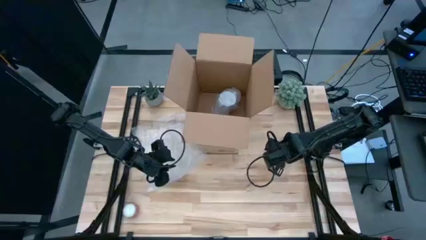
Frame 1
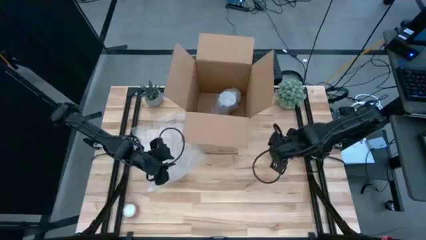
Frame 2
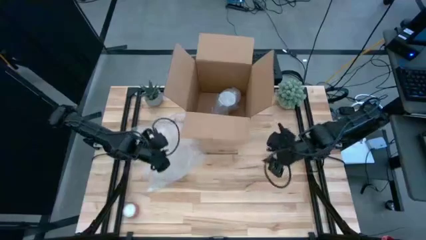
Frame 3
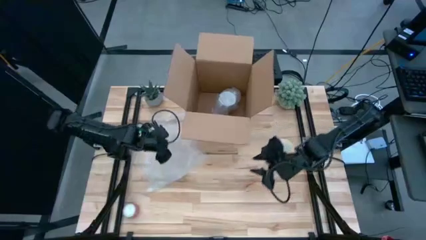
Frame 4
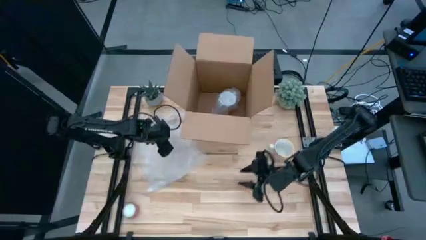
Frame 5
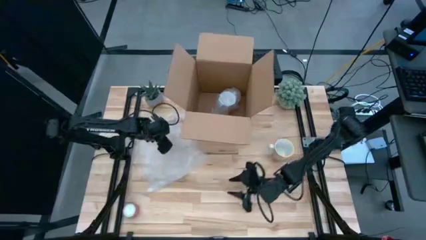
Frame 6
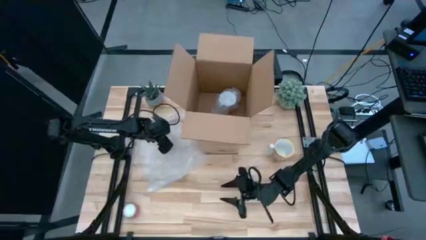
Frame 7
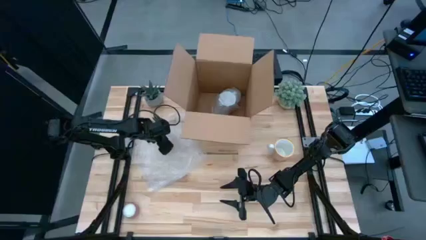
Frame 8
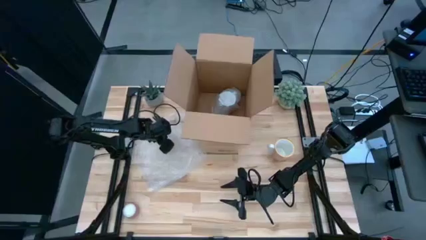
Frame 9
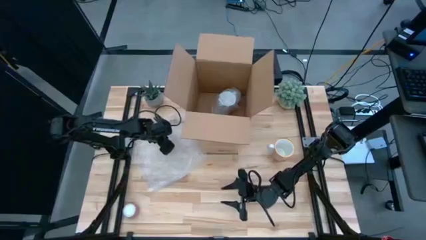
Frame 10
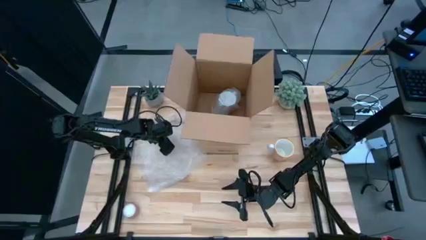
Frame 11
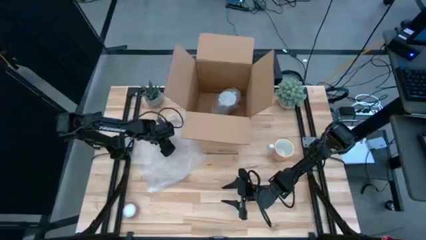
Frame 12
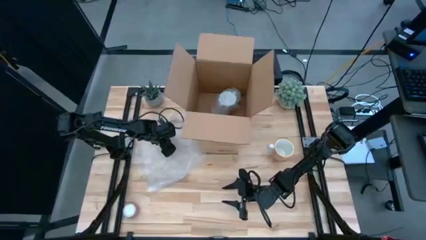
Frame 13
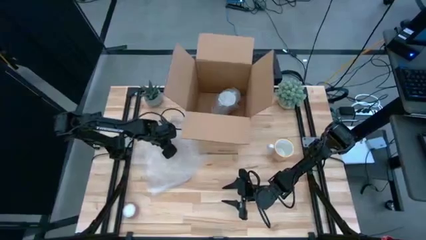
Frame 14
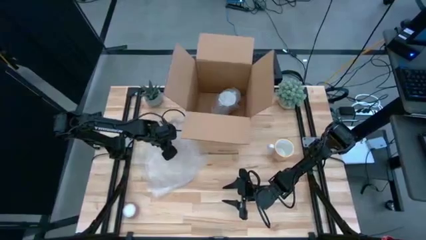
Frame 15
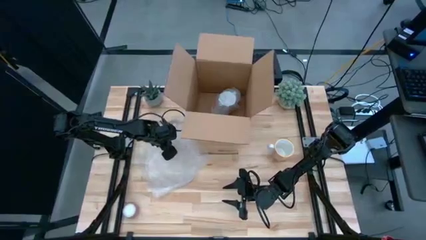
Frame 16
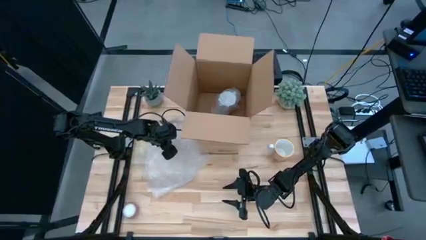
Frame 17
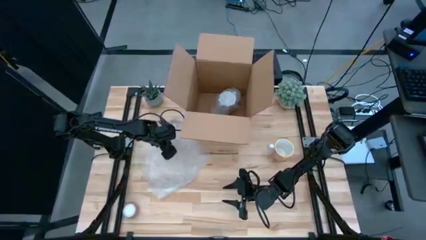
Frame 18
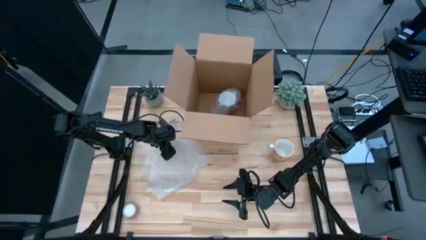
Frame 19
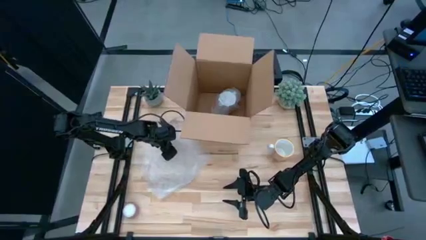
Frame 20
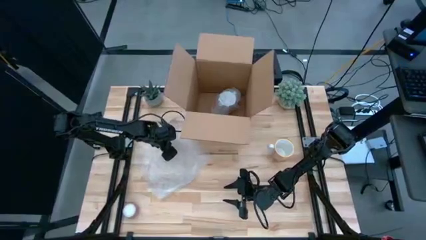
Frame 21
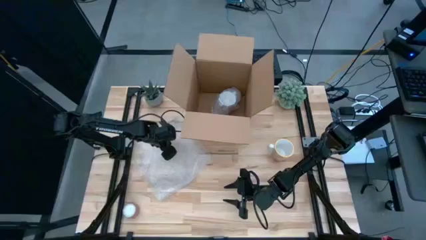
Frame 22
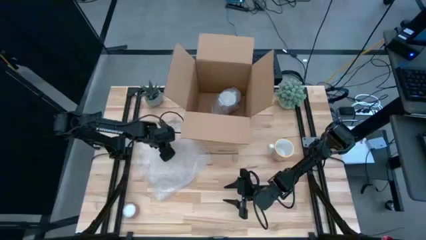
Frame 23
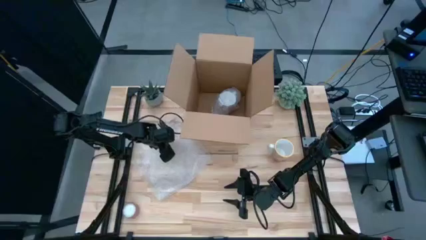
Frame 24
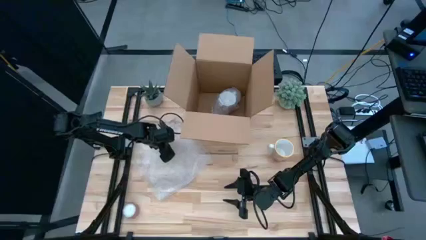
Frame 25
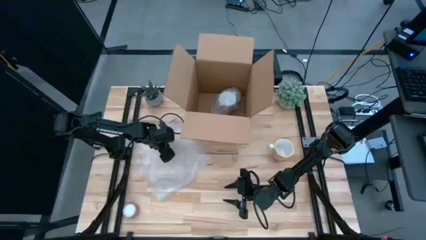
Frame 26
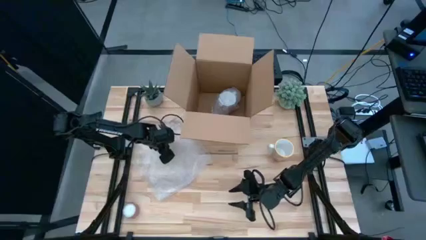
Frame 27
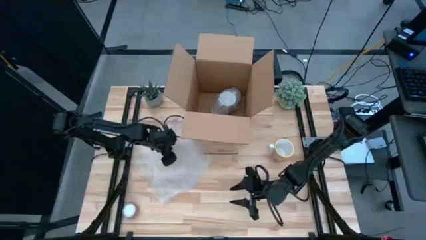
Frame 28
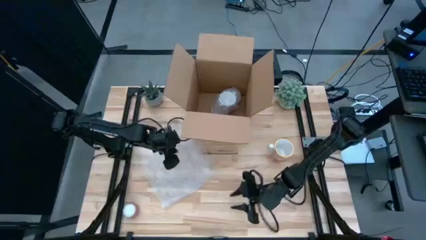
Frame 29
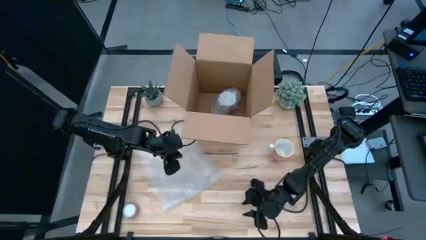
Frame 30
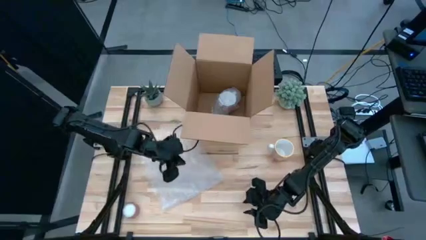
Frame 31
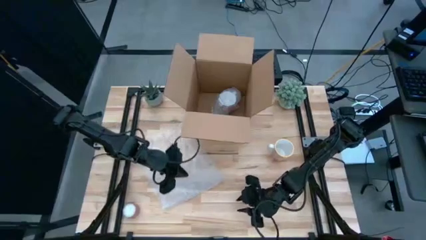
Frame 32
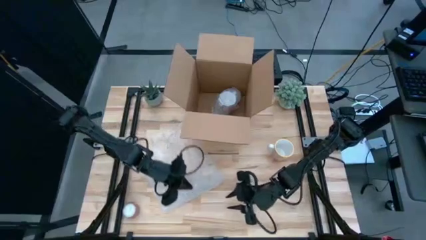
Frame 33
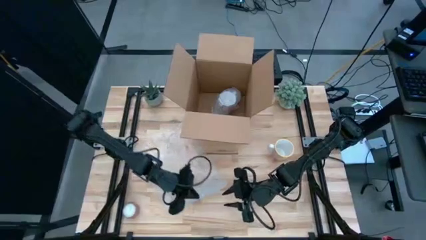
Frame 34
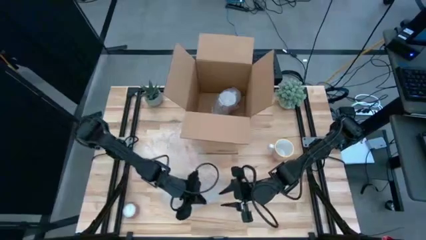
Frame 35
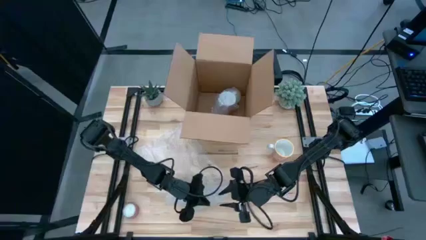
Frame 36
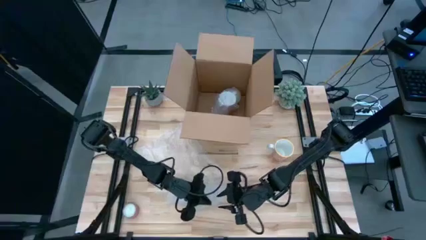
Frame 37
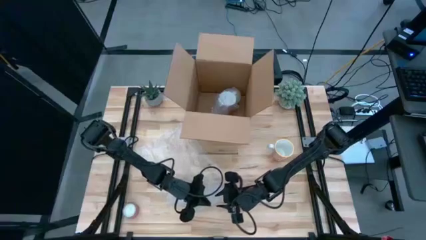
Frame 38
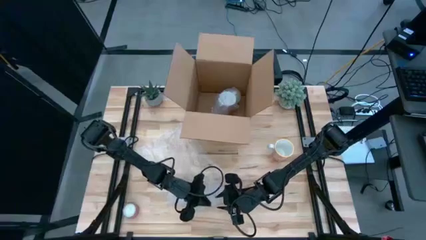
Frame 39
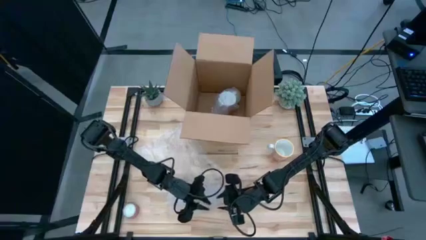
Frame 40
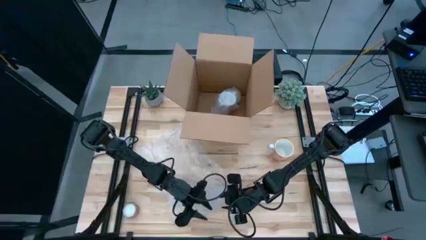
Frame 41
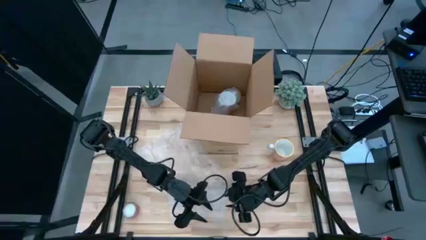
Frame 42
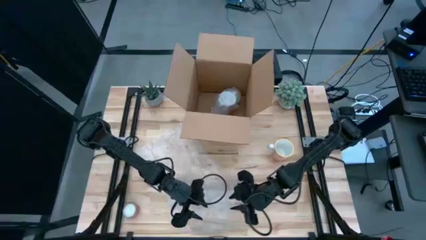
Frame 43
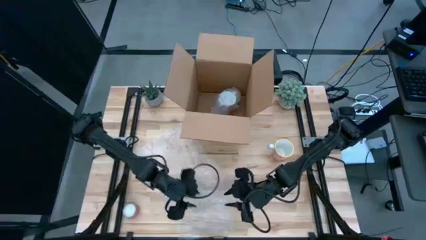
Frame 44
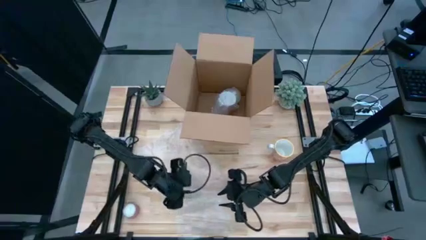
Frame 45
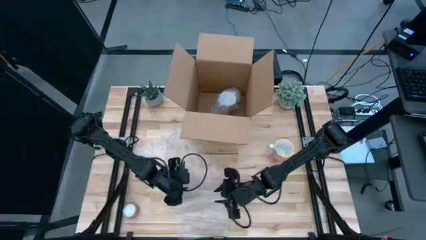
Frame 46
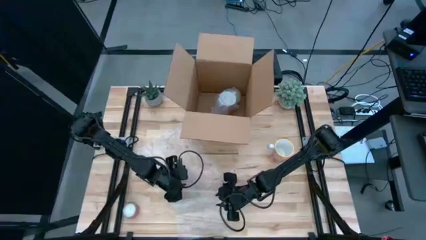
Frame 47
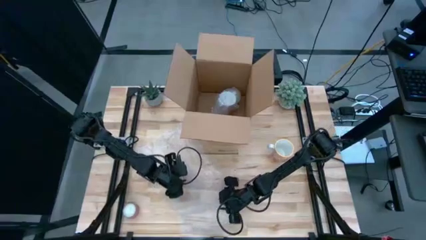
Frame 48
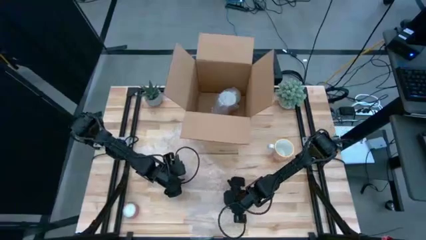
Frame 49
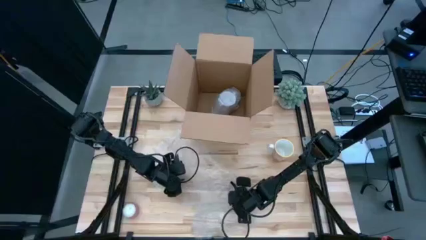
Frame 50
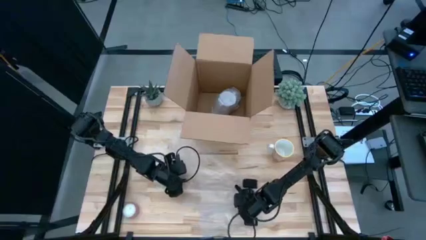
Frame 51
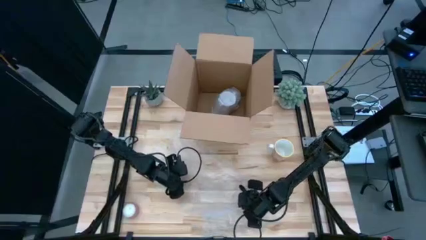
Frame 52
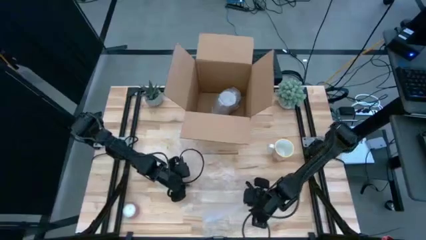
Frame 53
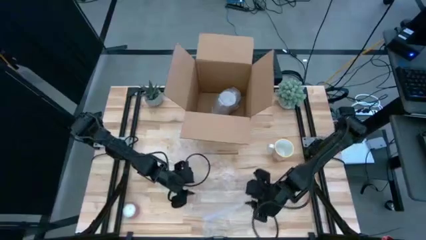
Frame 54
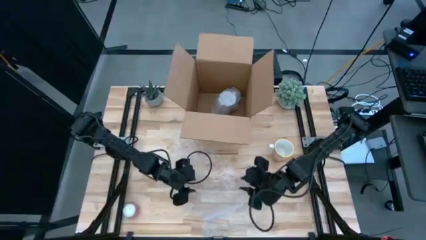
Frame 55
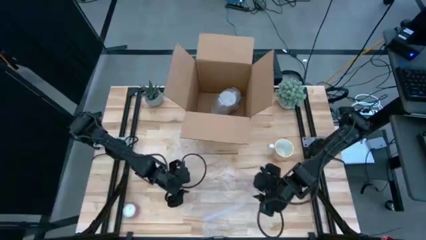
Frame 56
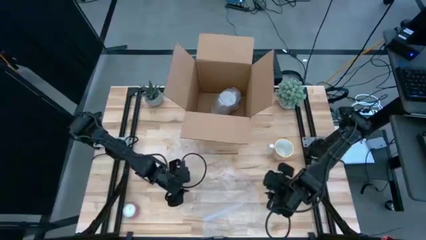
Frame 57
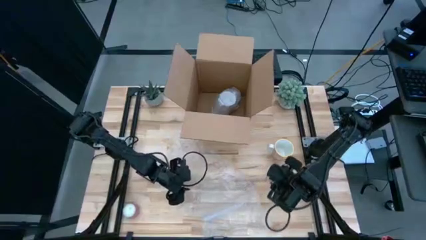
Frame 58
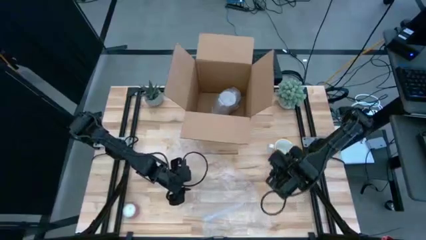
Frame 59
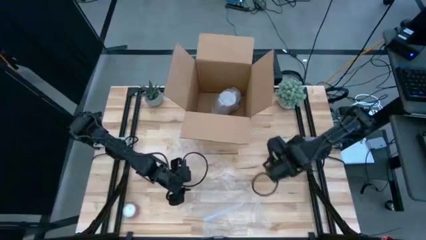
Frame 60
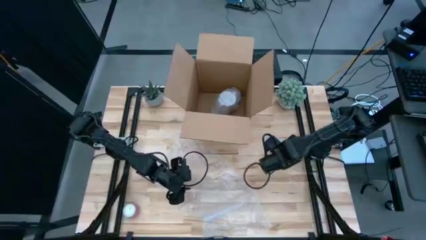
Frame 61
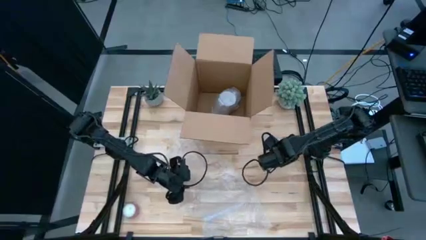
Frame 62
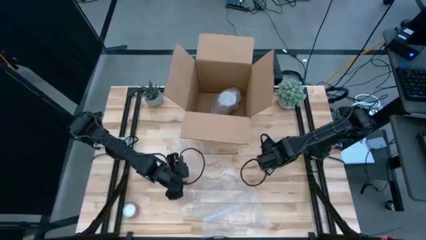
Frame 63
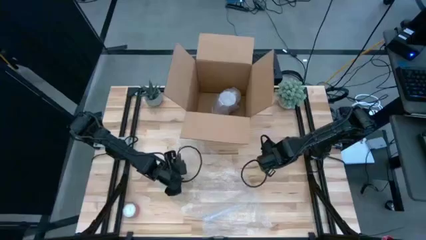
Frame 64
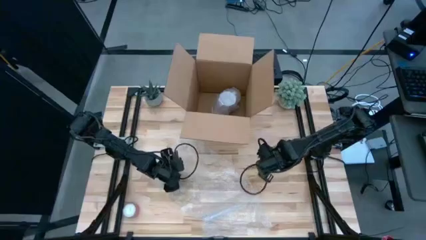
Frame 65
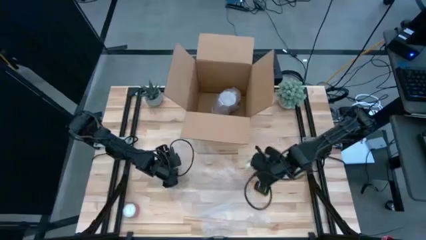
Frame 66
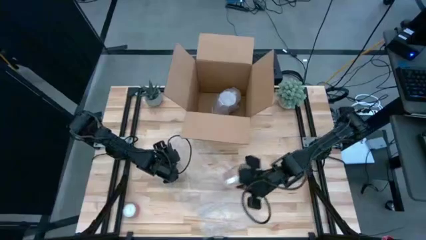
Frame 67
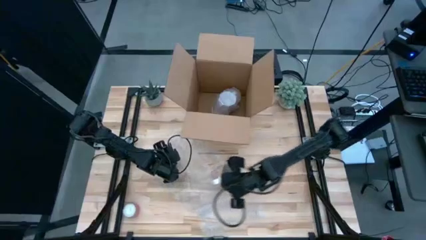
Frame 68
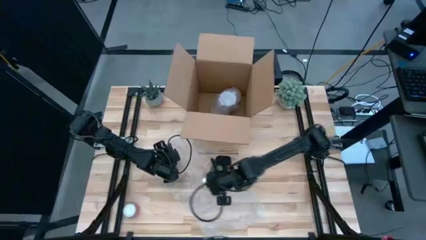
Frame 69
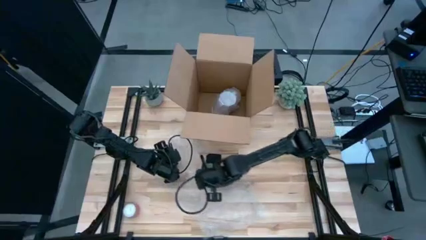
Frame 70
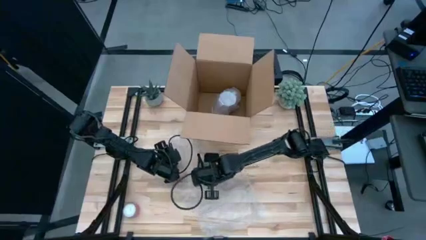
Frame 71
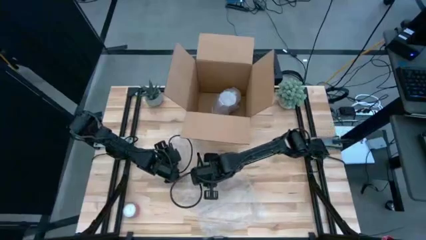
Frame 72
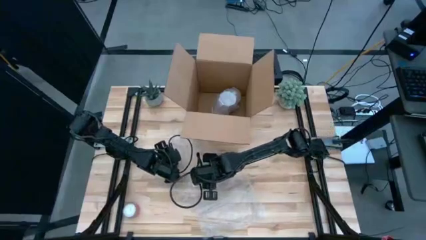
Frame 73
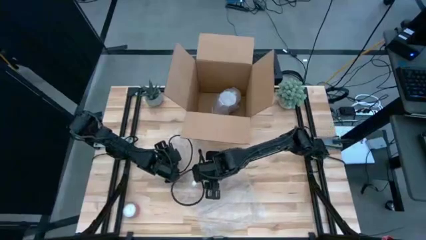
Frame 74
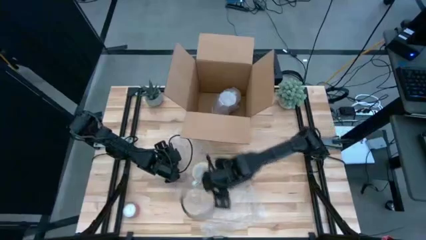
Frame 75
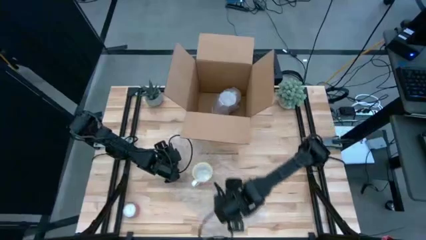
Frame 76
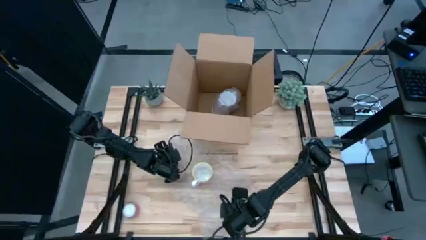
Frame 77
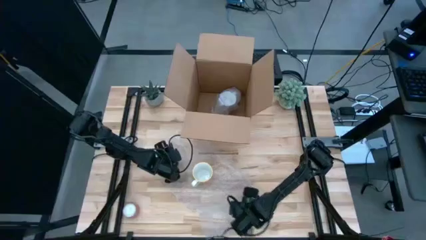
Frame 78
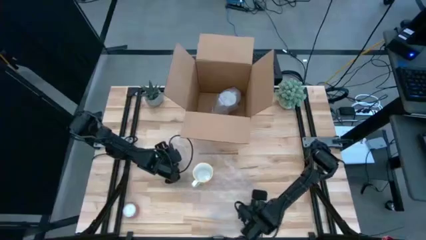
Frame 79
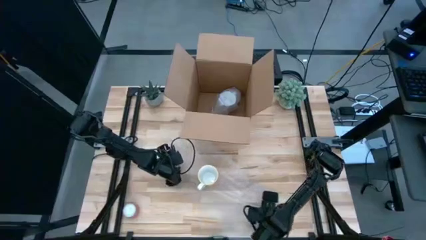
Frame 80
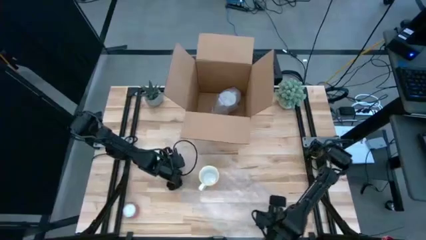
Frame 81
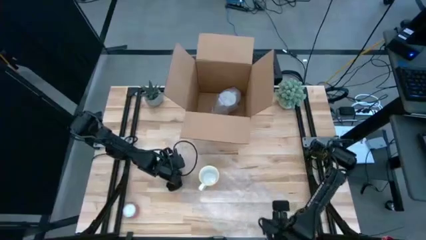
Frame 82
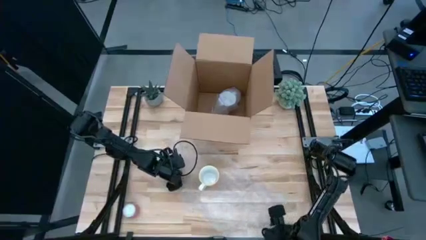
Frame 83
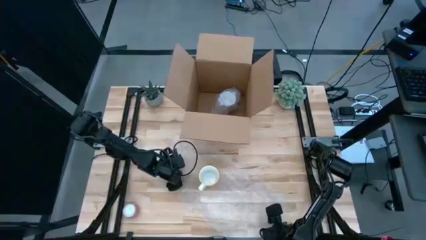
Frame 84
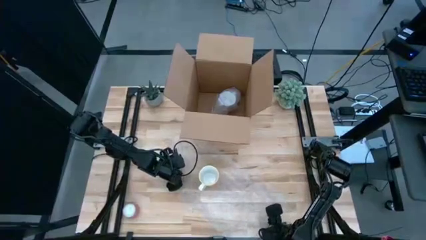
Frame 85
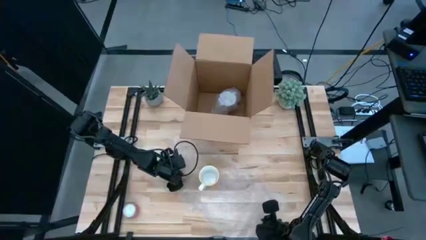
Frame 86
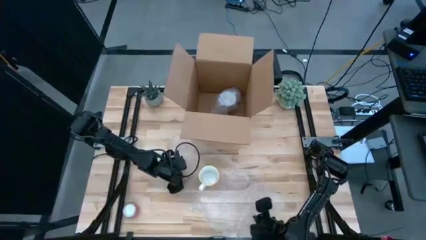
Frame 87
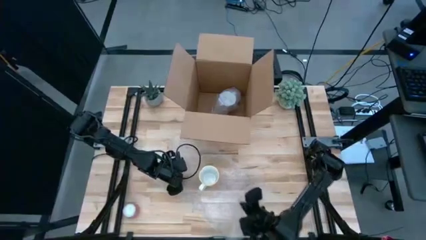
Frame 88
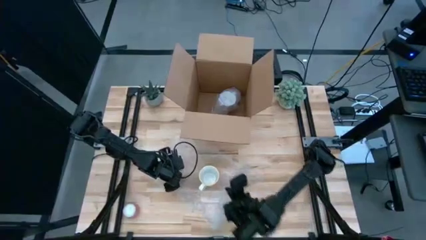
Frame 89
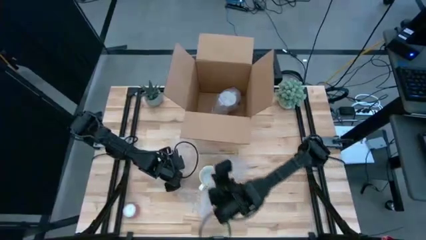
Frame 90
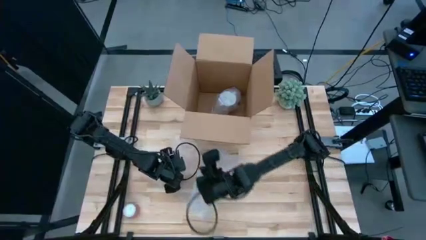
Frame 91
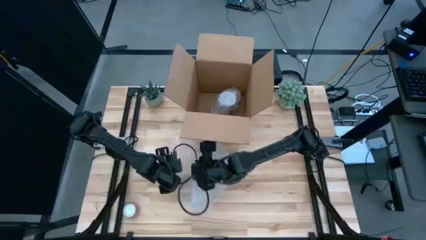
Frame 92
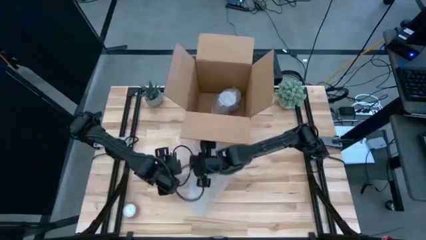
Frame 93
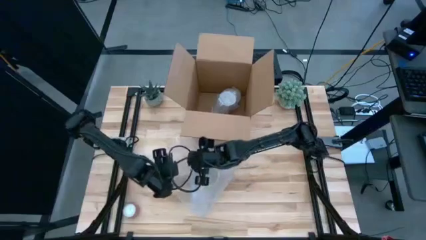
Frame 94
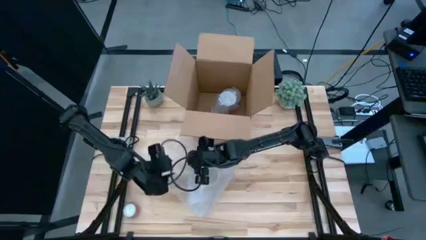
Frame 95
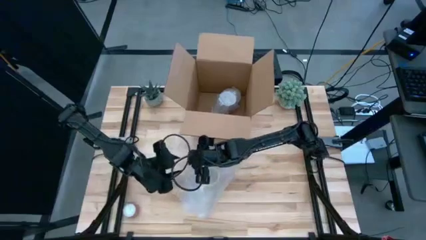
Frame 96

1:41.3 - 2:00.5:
Task: wrap mug
Wrap the orange cup with the bubble wrap
